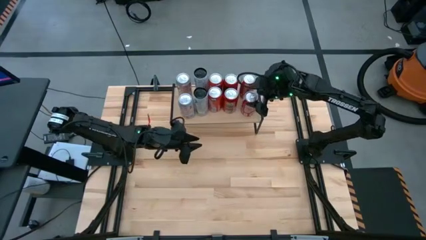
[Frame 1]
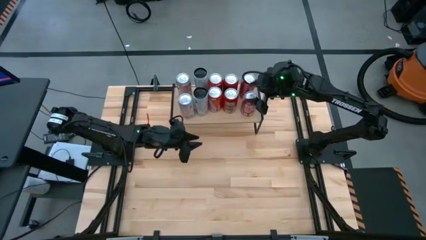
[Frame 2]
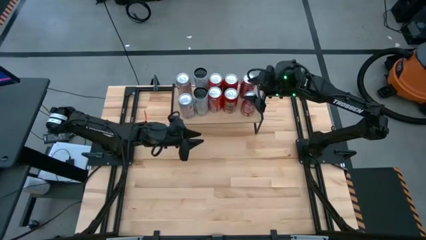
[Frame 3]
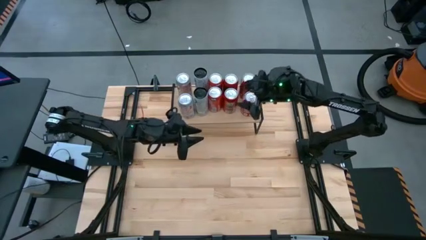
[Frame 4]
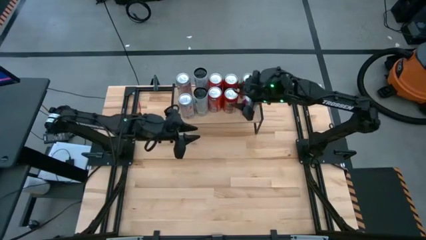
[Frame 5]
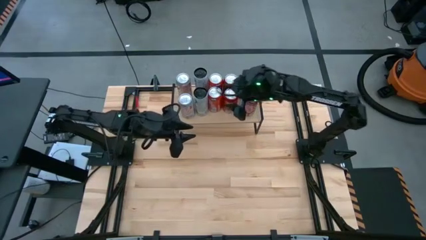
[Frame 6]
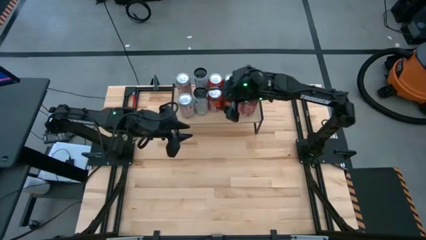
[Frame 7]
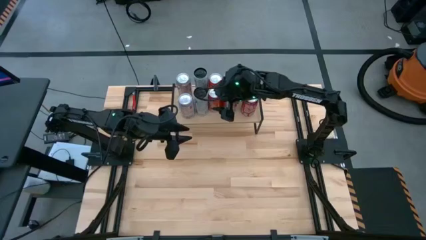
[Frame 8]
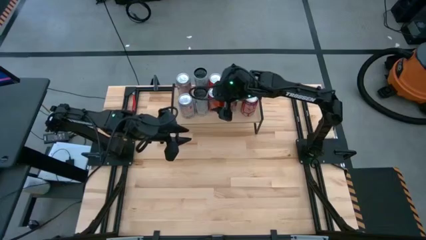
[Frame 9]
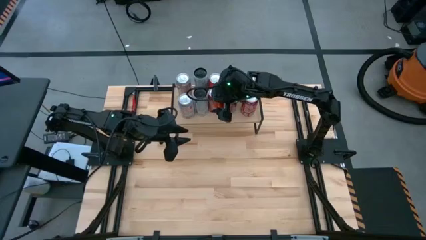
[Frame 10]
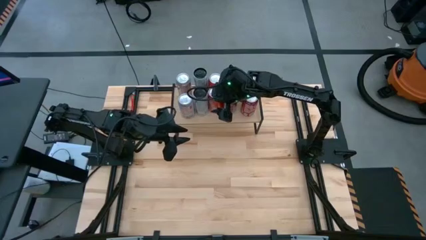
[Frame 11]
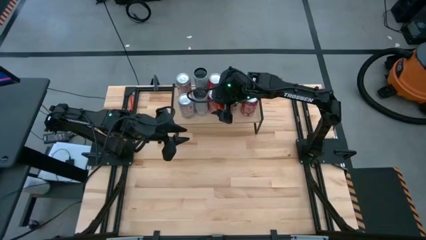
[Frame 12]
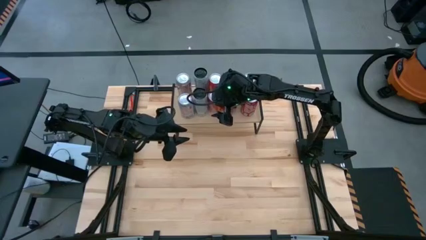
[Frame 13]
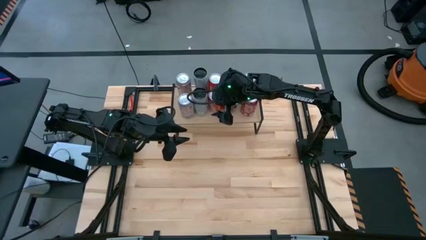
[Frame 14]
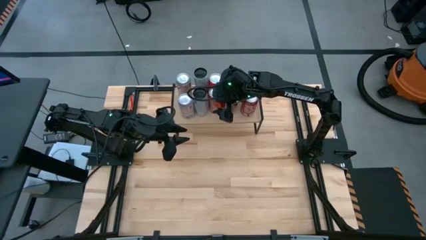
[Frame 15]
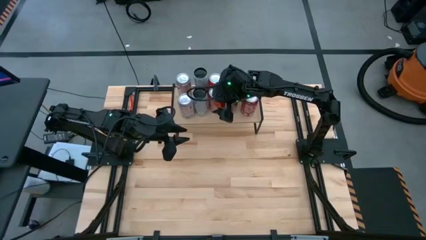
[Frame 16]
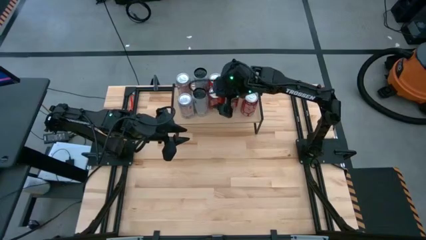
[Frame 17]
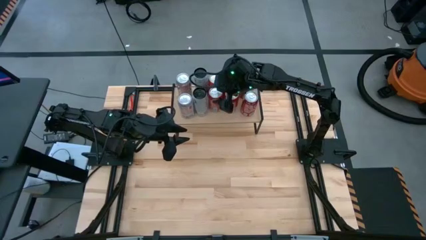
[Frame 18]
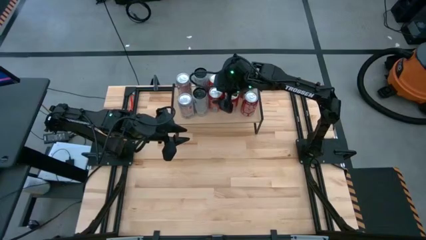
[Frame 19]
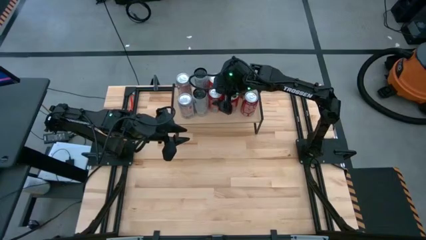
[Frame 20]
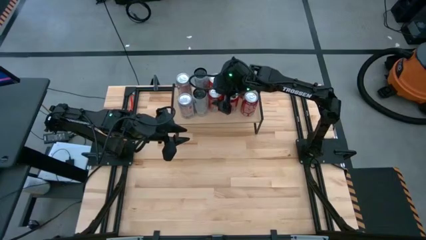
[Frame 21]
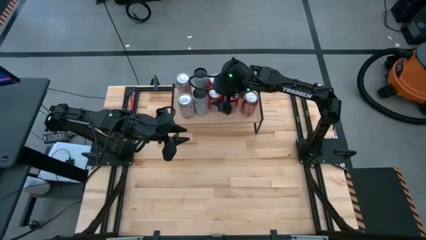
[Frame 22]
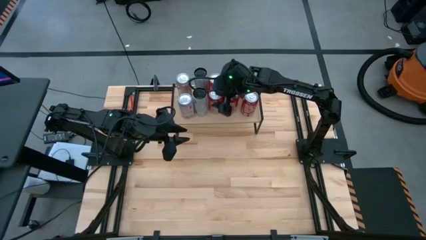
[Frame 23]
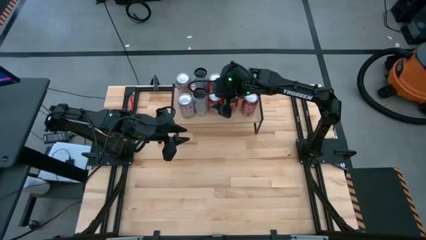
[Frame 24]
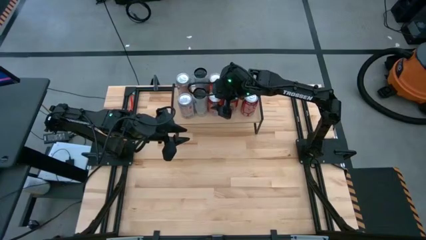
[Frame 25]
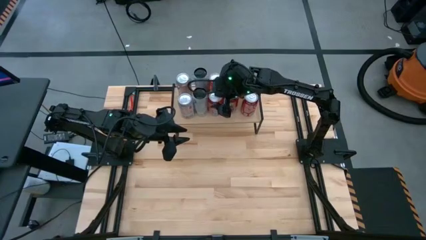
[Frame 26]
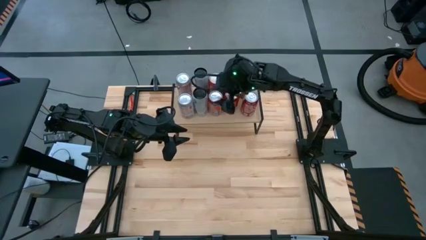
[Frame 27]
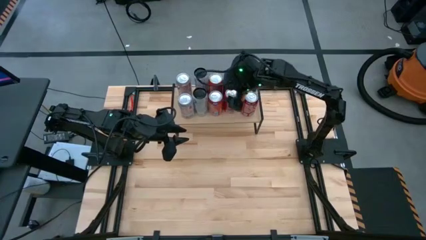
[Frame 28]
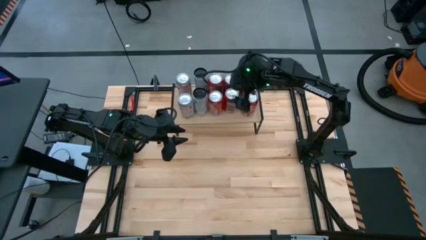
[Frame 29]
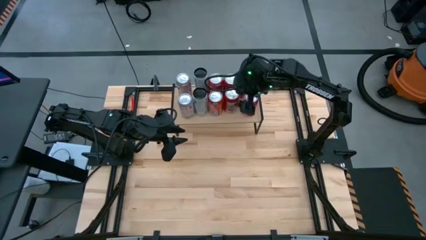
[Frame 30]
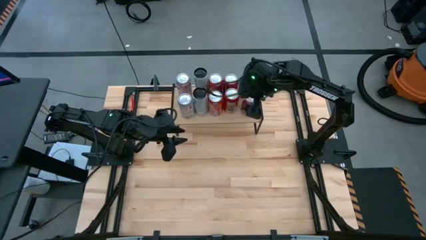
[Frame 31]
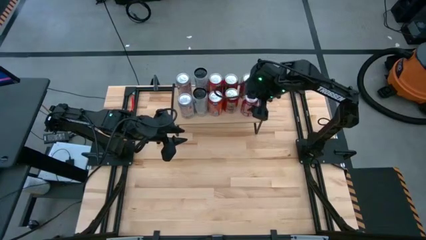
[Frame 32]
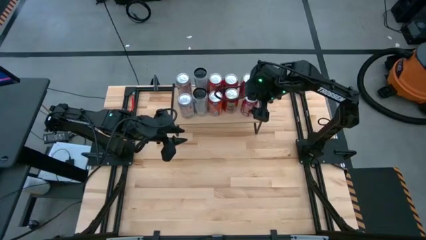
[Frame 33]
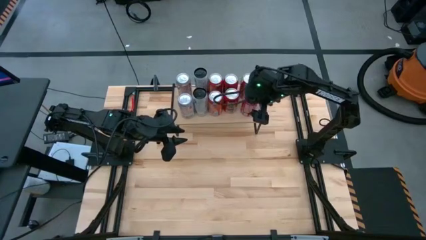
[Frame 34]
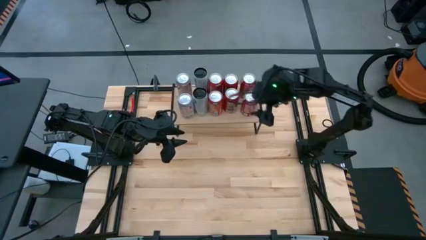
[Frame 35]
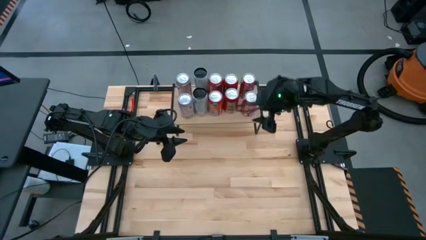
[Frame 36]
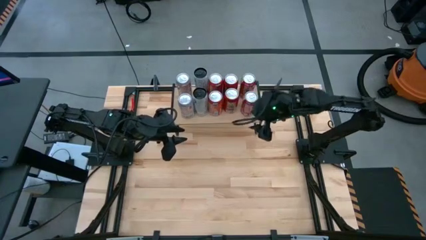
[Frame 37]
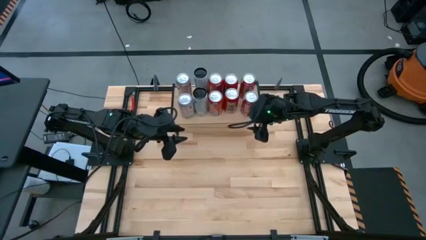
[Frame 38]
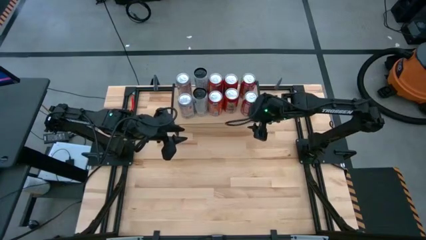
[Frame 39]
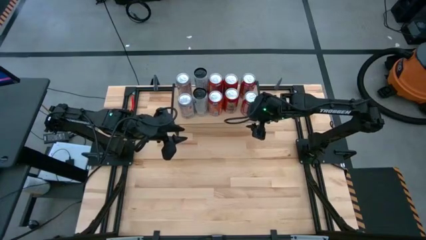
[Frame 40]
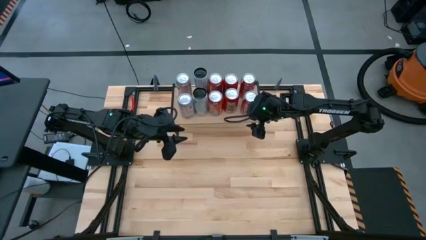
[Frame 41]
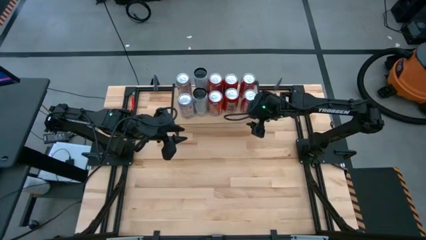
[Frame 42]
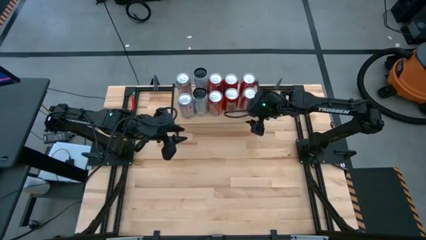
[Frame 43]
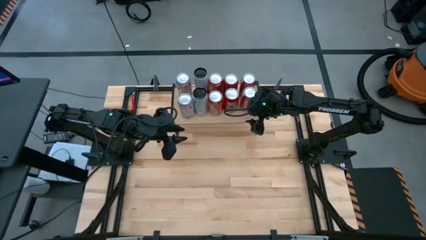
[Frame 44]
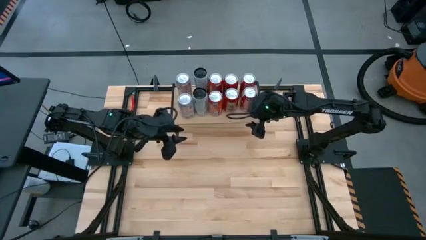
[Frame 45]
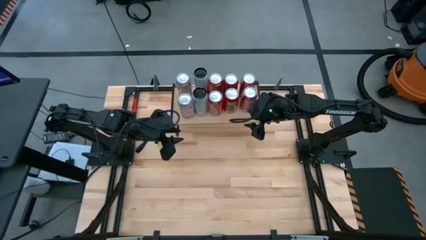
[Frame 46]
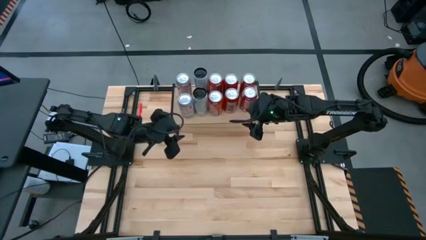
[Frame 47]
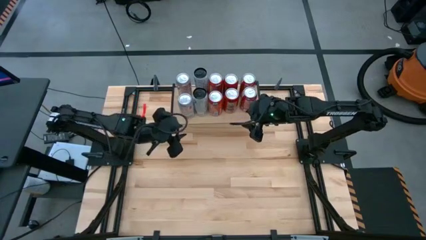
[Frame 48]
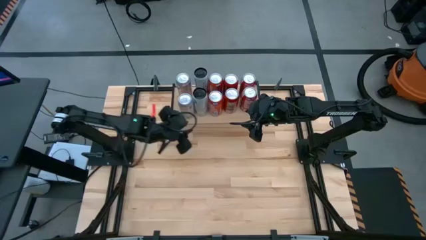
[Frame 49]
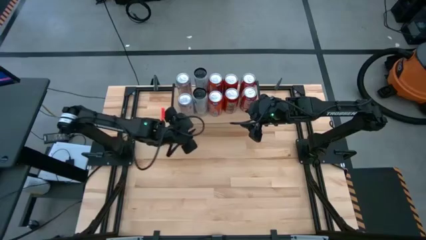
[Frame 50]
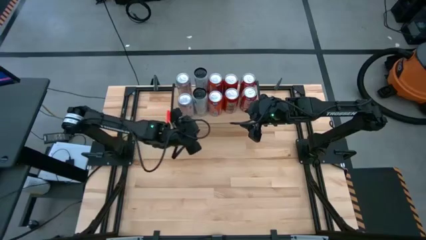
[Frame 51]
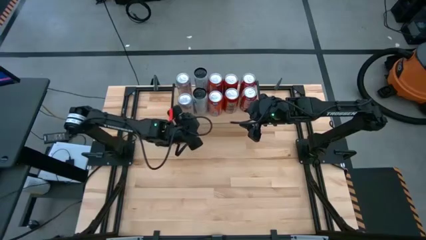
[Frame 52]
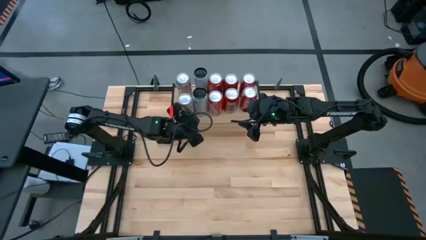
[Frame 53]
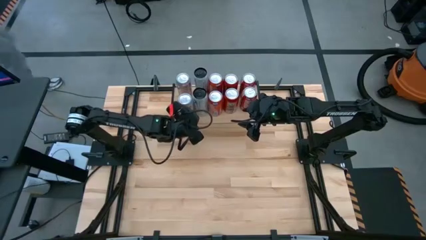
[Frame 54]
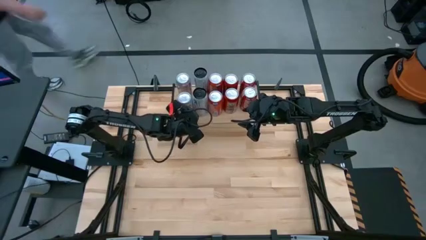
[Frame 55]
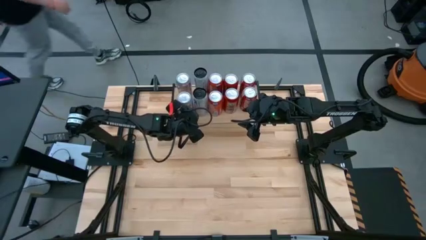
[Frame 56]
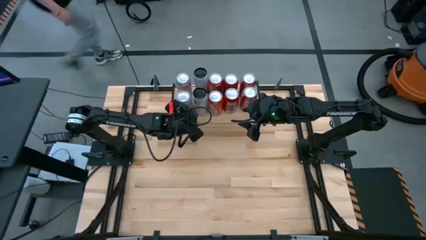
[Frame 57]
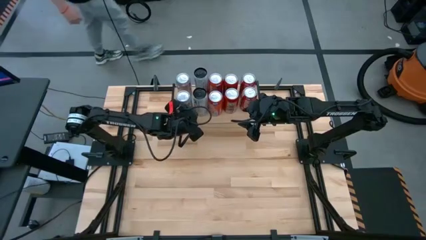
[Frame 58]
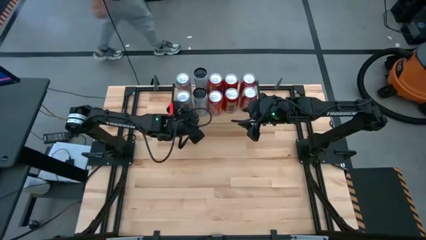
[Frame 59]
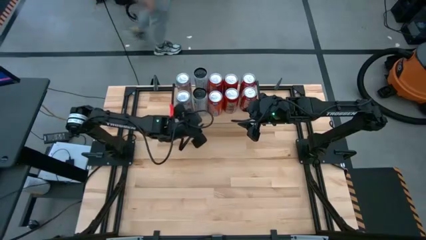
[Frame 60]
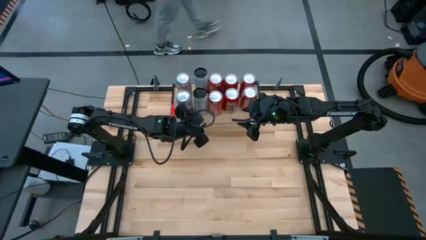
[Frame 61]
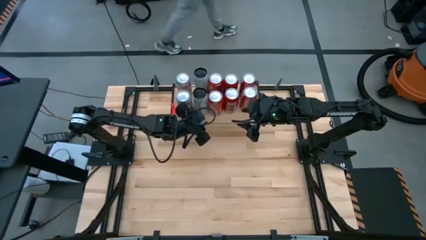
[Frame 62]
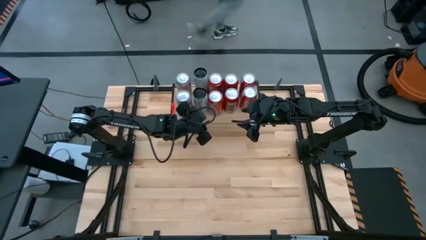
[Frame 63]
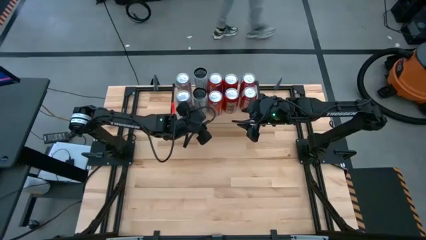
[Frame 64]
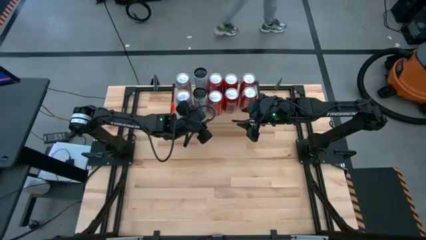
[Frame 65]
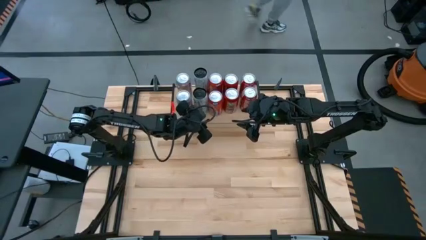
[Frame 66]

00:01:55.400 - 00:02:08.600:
Task: Place canned beverage on shelf
Adjust the soda cans on the shelf

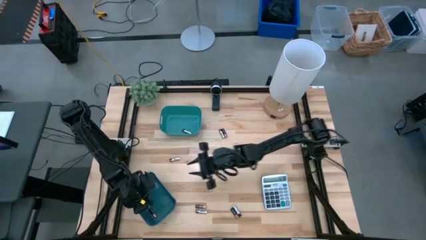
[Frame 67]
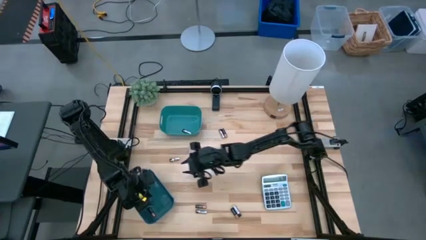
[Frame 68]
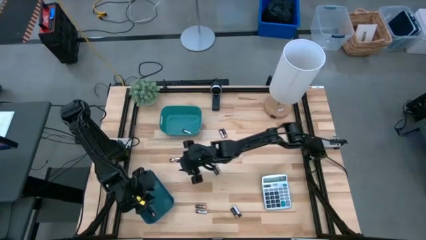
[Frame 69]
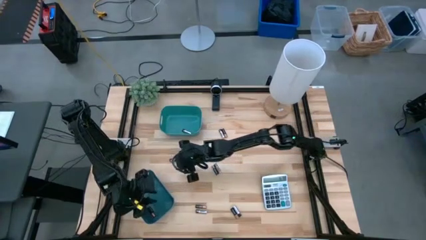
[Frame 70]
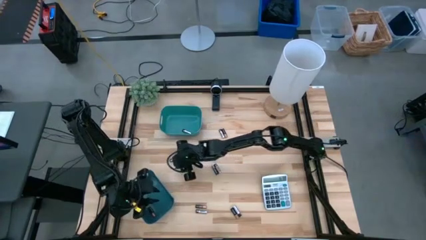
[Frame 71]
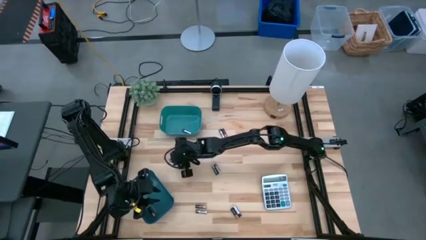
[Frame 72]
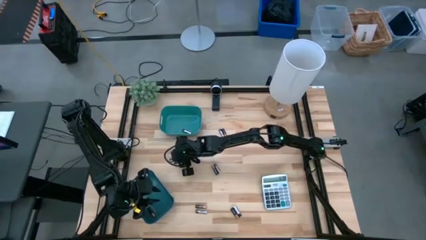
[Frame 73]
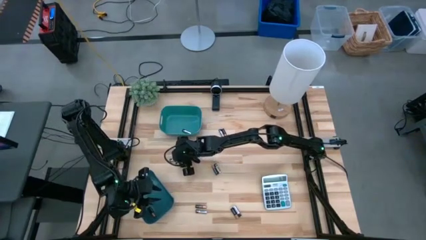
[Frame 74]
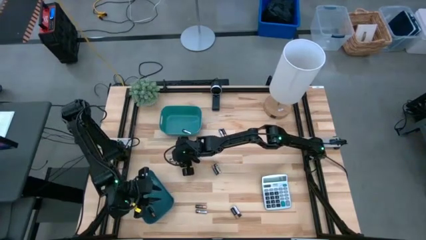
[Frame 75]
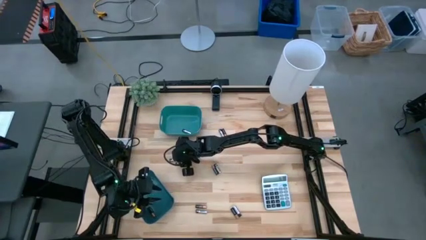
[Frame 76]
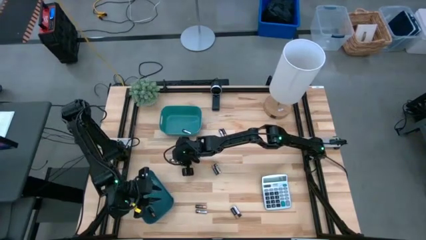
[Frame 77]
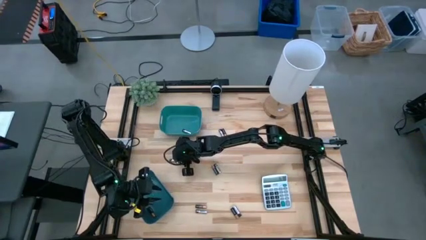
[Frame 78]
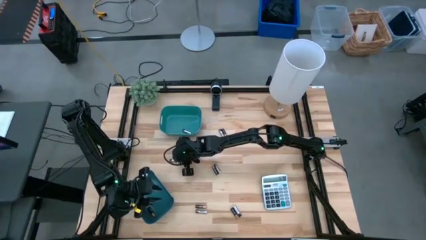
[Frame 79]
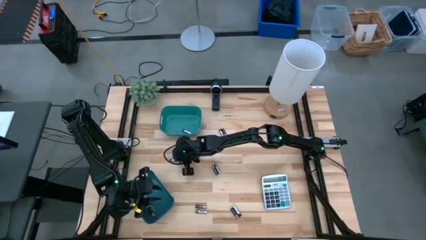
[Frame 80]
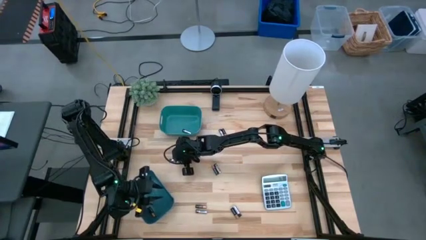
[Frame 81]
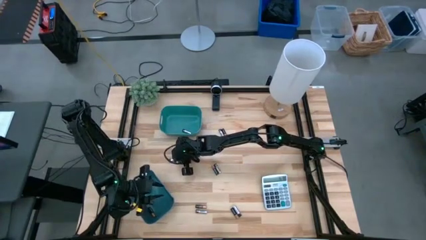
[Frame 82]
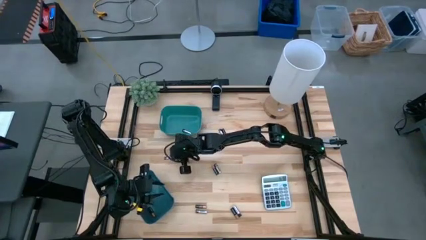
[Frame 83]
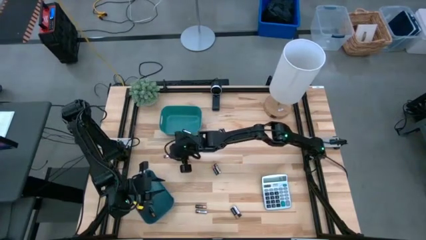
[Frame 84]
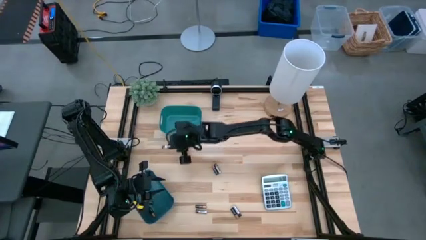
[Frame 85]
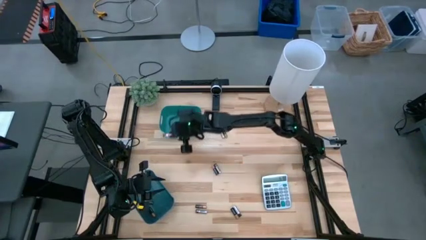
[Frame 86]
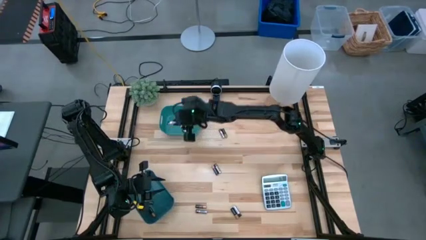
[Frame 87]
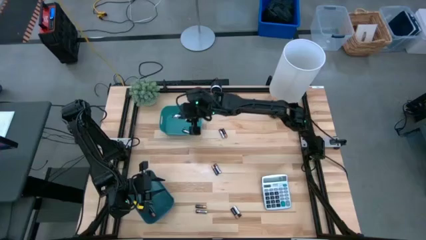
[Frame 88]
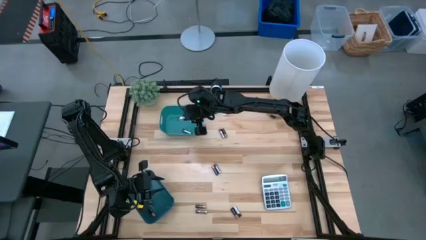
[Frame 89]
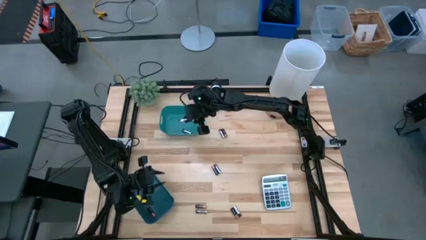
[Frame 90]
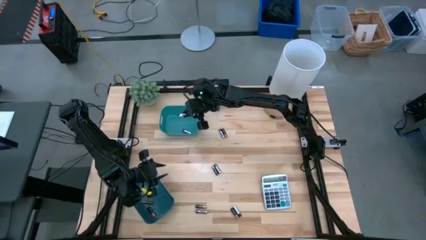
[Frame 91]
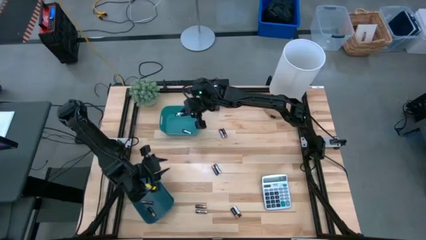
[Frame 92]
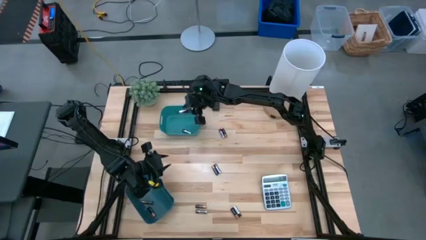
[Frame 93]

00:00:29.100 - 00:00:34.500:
Task: Sort batteries
Put the silver battery into the green bin
